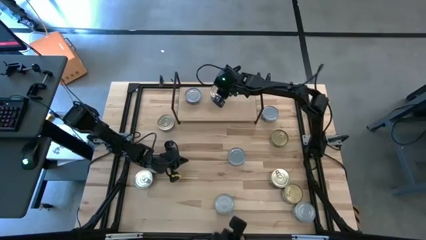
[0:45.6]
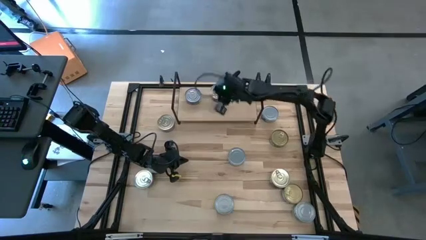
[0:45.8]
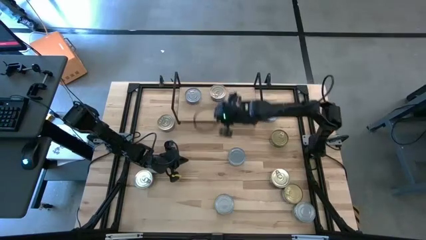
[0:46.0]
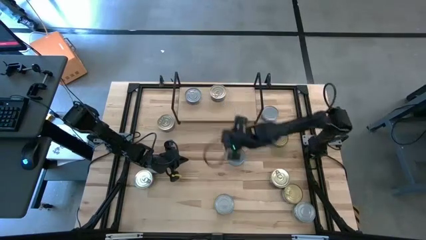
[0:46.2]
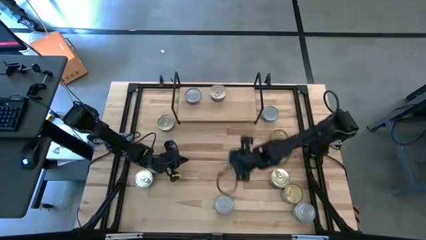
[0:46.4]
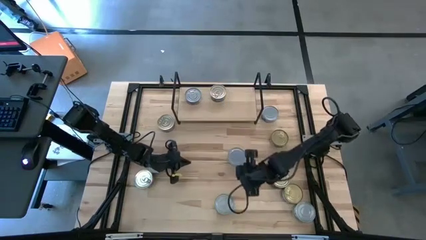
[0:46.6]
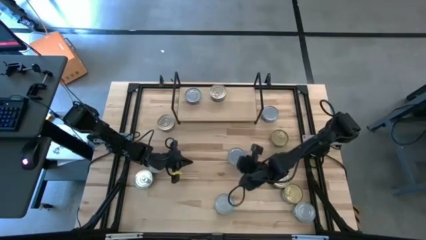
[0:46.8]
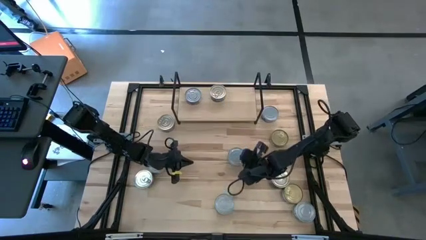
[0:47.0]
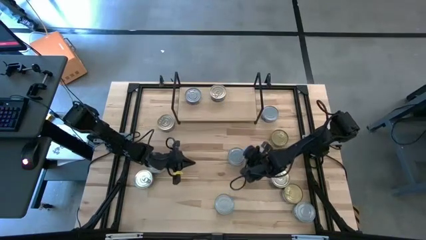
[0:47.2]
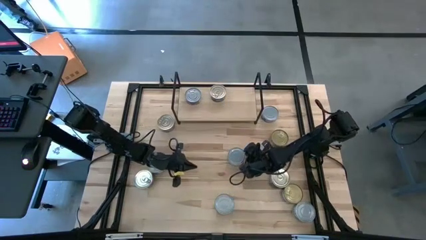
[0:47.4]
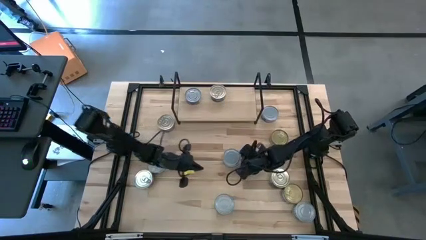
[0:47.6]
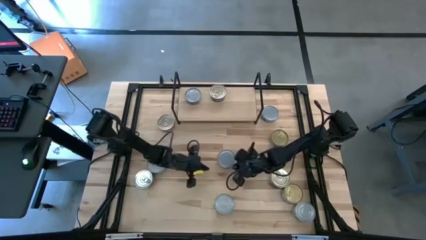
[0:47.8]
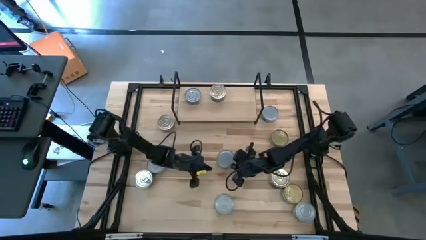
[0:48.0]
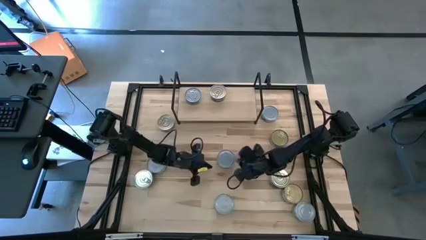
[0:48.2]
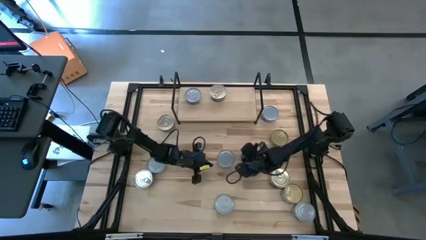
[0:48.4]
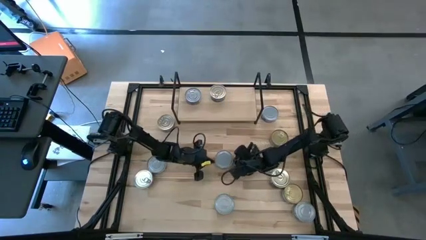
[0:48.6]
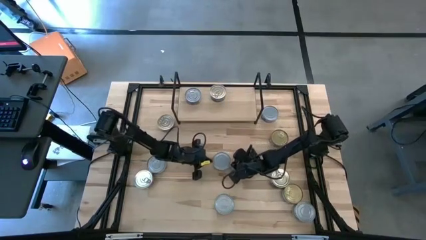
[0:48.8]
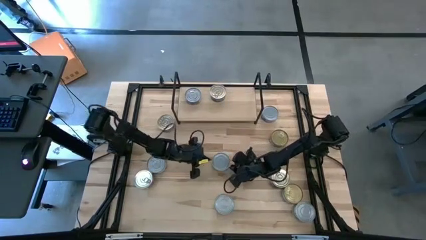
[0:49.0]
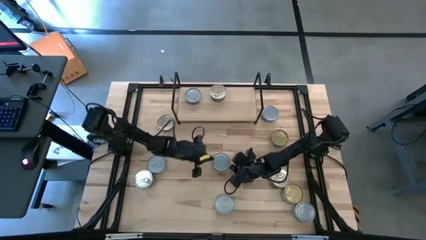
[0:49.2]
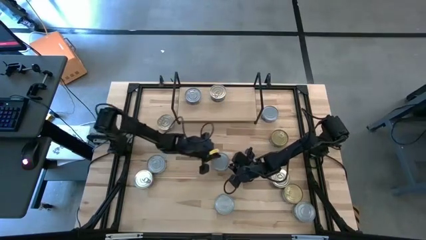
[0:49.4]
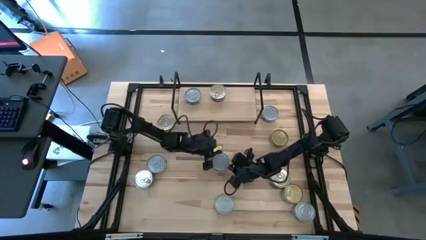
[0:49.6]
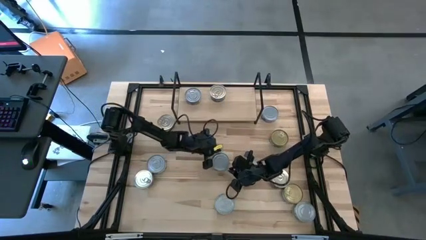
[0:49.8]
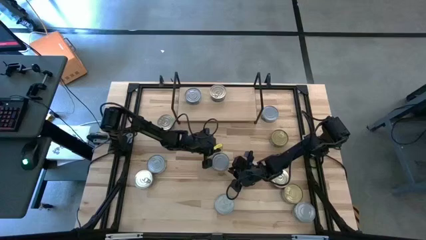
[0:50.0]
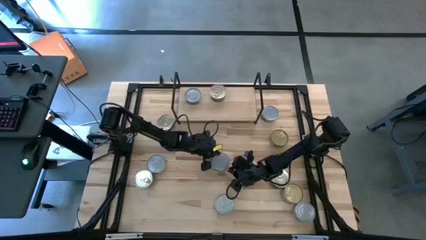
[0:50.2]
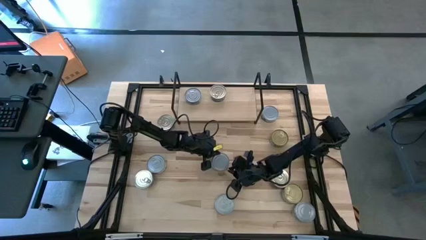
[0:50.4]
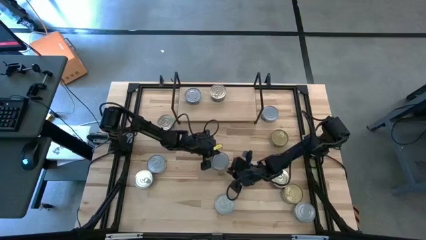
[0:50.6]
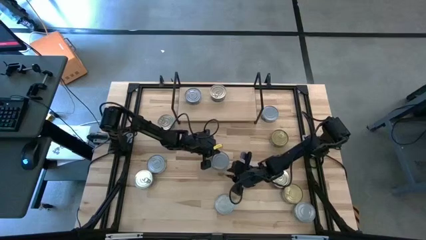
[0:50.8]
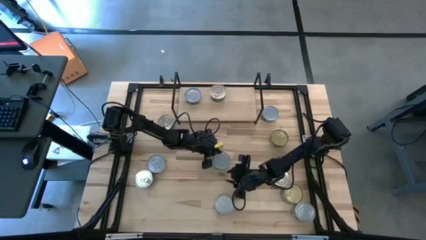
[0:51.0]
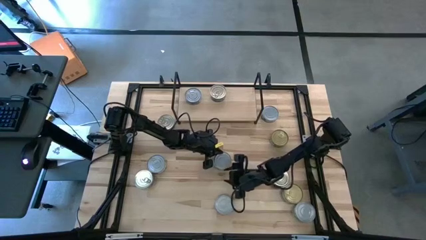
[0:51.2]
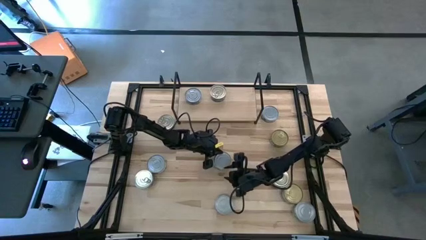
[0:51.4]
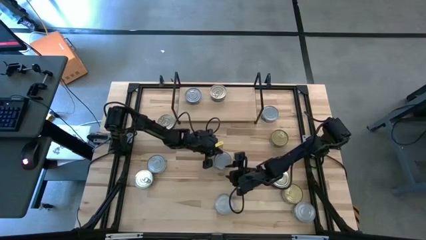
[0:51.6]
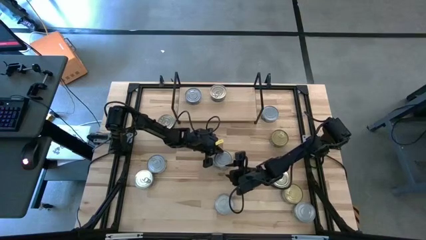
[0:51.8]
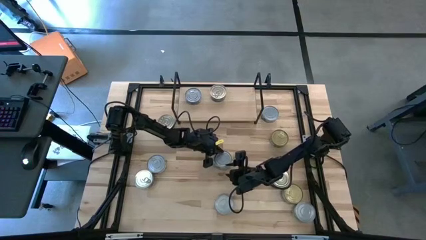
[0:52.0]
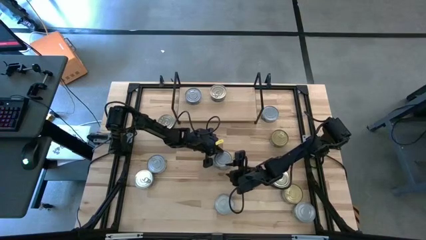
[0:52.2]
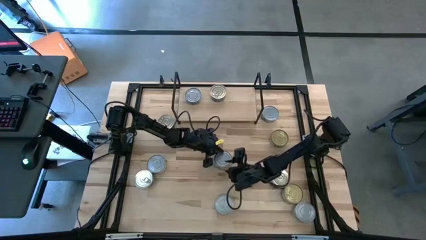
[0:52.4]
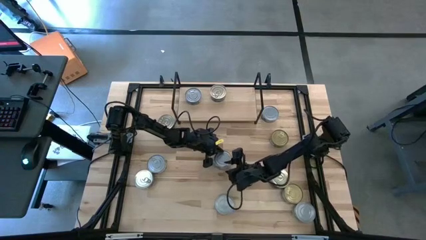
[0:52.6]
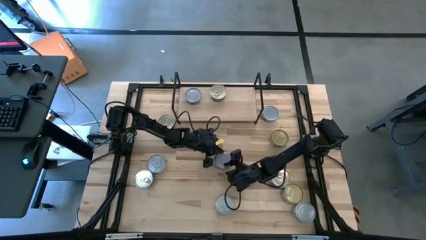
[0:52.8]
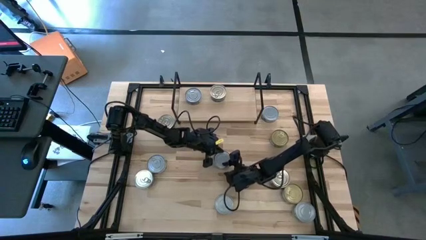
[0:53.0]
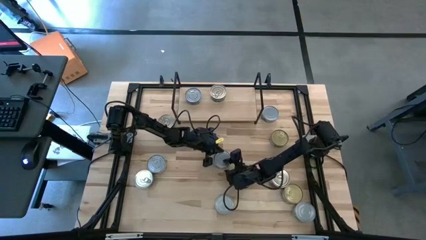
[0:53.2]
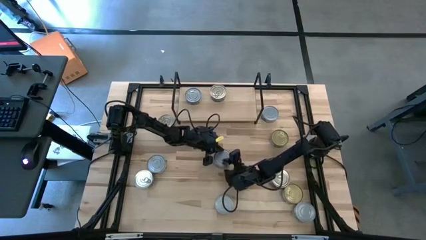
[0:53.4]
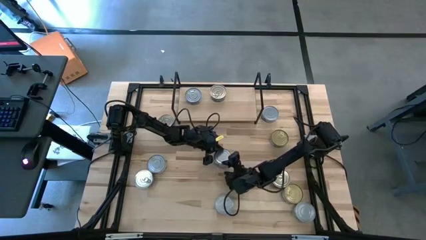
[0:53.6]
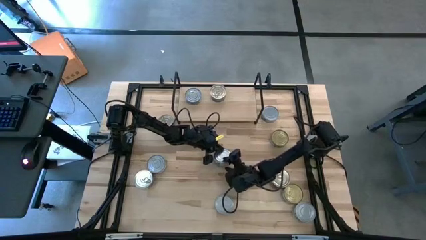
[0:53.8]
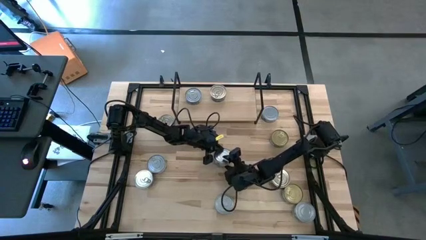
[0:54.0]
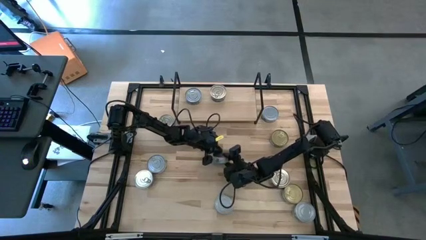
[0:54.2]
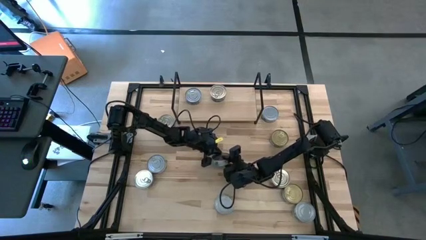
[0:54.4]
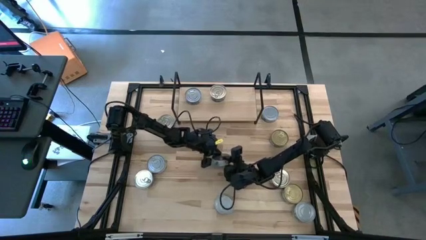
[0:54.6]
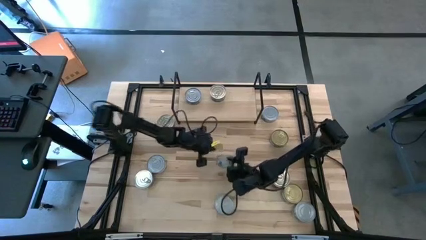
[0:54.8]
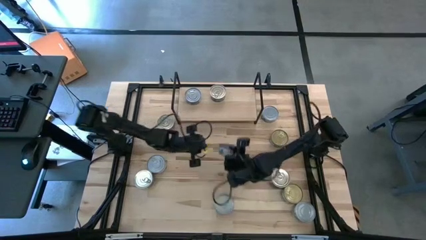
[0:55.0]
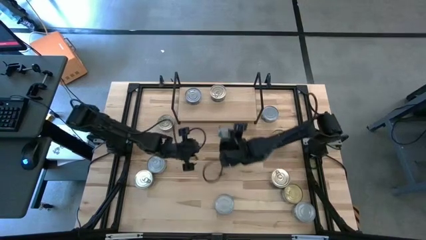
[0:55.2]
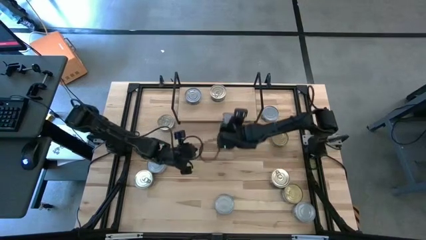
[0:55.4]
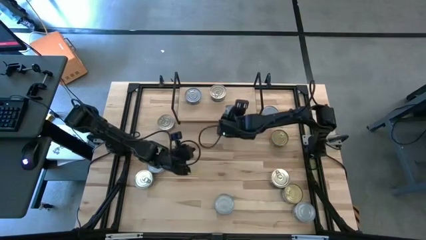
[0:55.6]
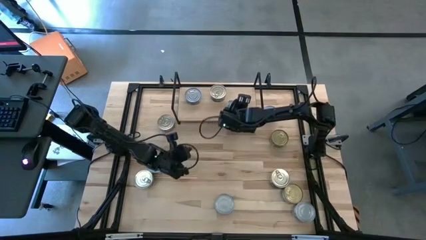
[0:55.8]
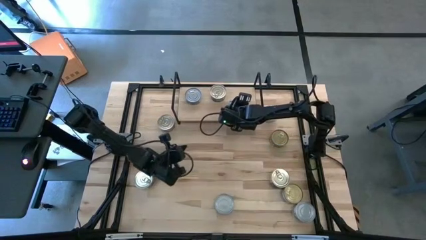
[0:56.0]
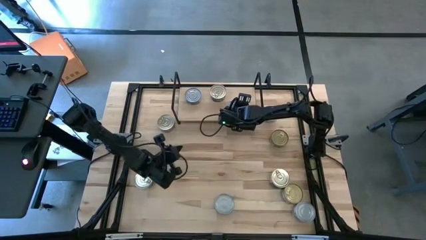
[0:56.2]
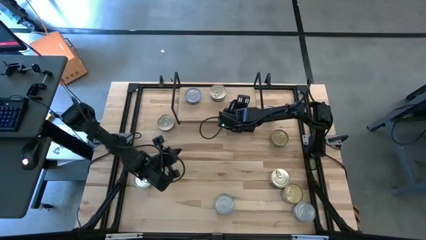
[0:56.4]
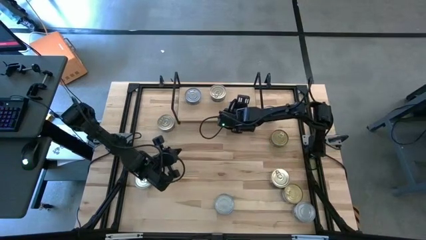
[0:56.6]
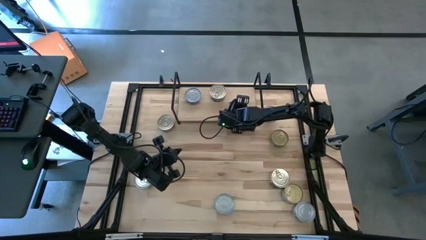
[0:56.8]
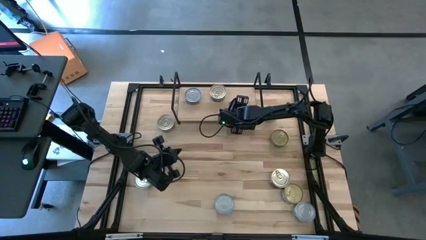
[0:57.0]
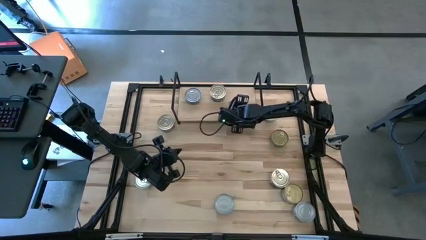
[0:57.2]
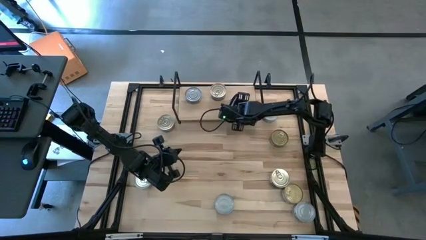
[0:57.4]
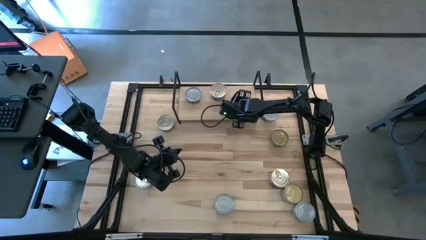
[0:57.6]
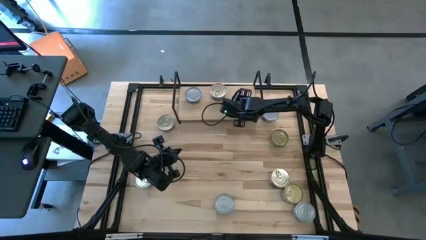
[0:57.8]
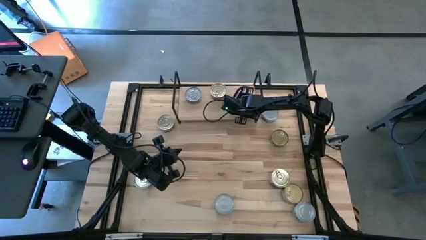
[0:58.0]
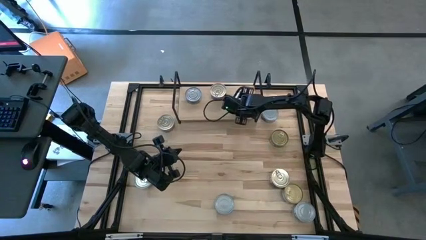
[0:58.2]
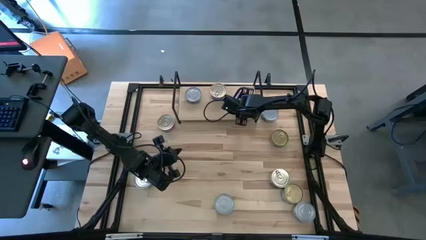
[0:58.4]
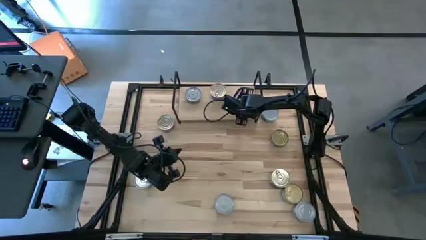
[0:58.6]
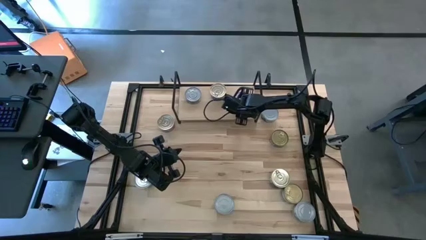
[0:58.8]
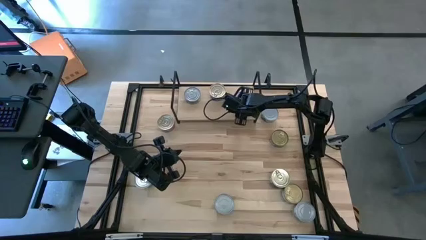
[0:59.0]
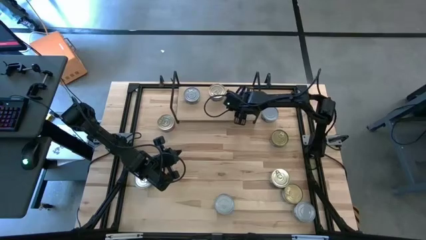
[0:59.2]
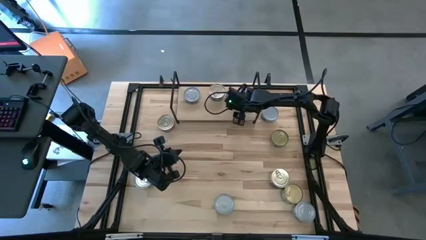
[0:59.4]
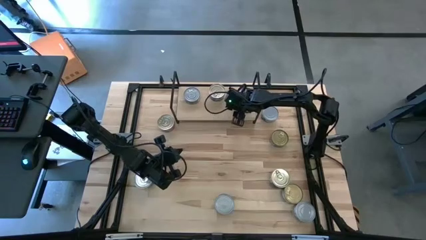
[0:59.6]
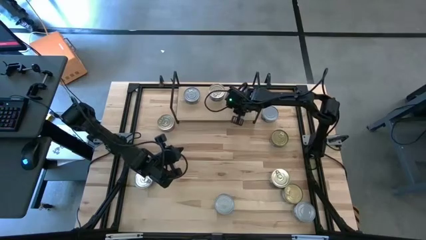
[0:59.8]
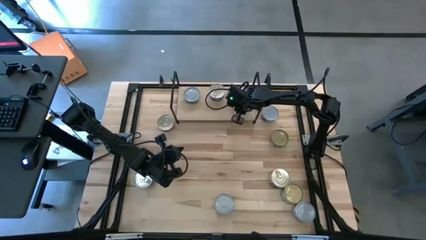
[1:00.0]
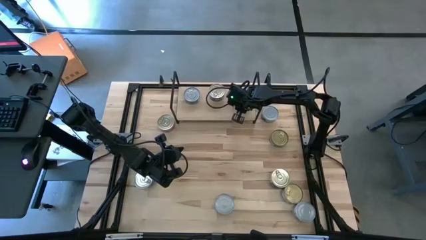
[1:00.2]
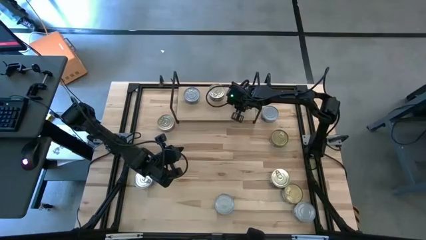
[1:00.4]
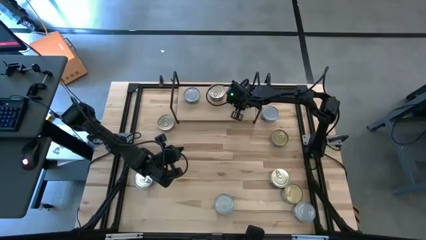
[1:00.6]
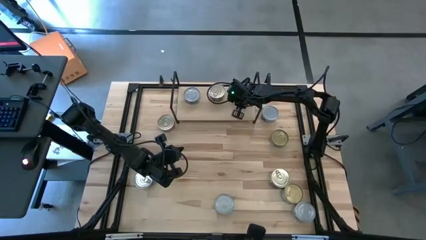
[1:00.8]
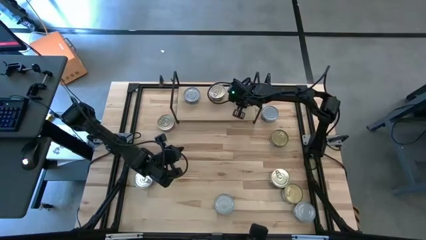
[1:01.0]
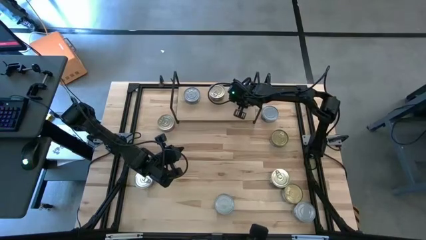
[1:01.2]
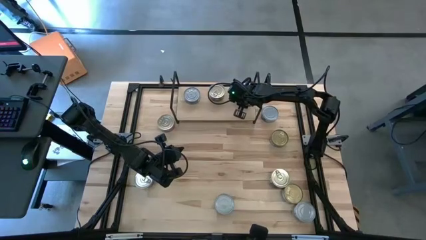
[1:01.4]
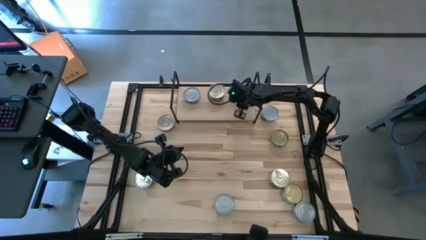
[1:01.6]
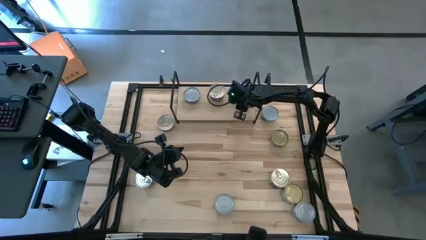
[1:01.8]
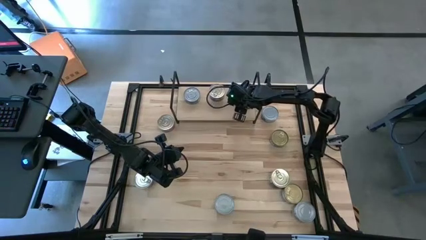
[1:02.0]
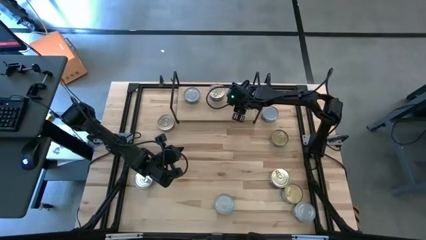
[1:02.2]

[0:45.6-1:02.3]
Task: Stack canned seafood by type on shelf
Put the center green tuna can on the shelf
